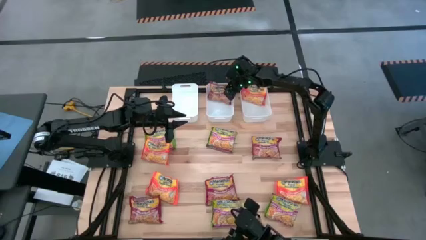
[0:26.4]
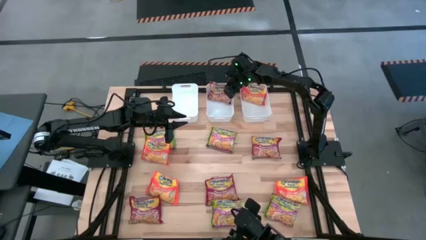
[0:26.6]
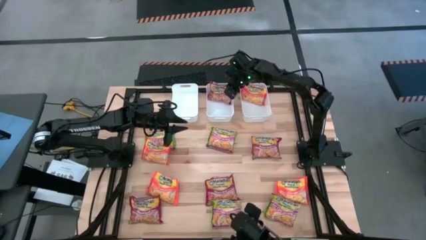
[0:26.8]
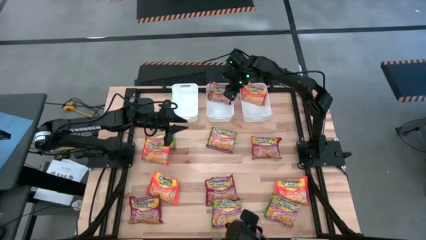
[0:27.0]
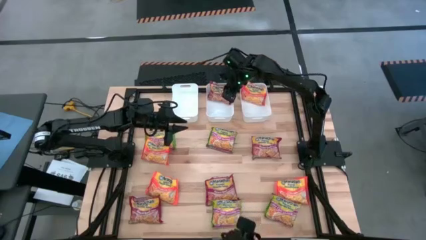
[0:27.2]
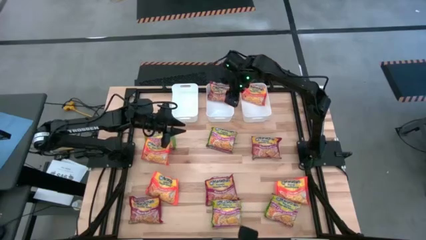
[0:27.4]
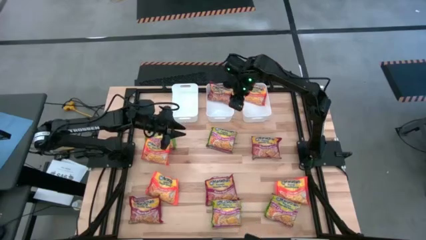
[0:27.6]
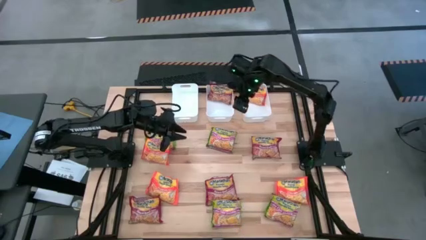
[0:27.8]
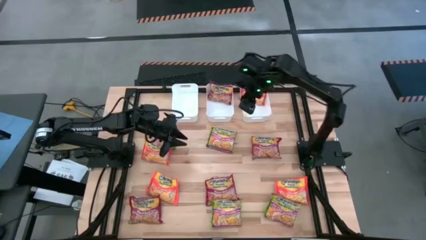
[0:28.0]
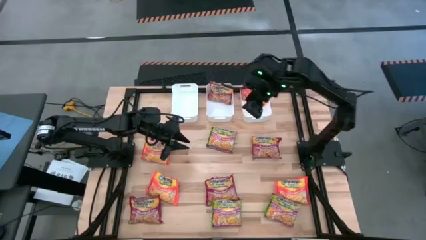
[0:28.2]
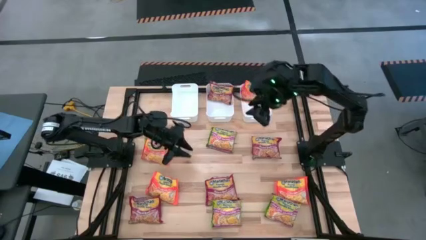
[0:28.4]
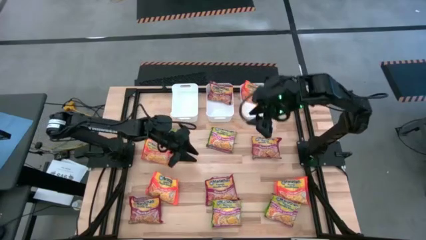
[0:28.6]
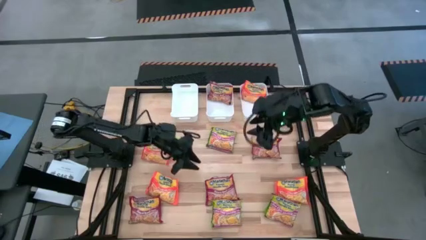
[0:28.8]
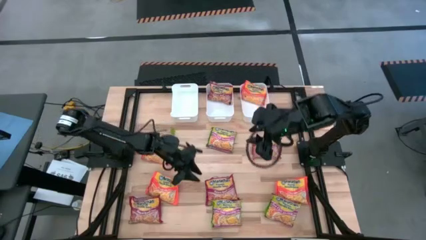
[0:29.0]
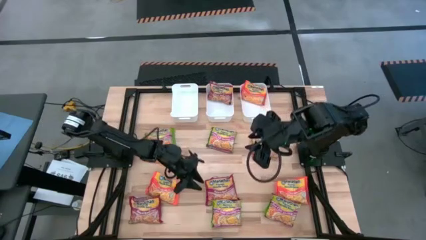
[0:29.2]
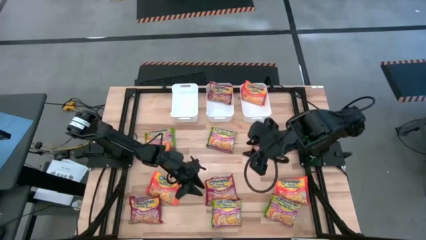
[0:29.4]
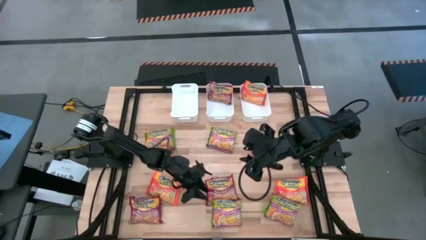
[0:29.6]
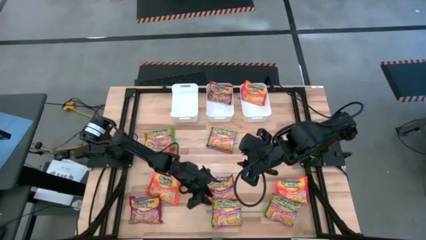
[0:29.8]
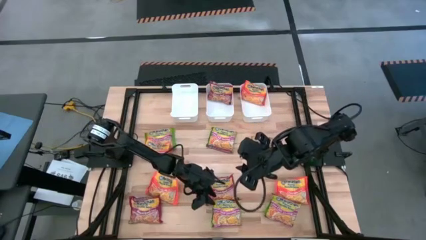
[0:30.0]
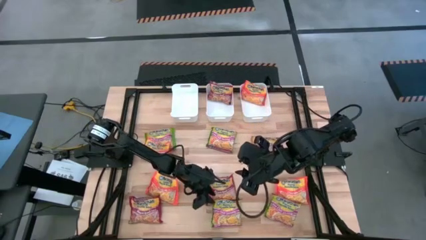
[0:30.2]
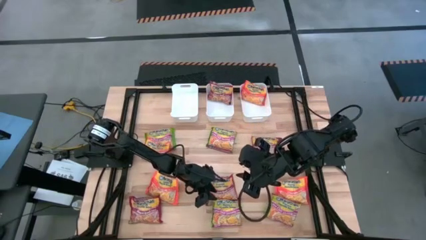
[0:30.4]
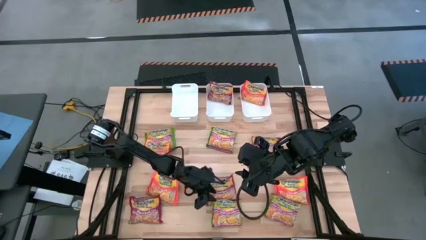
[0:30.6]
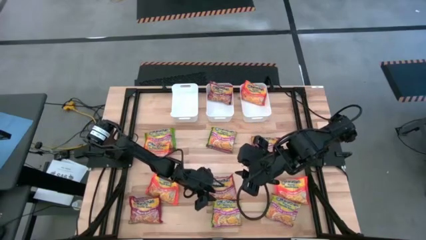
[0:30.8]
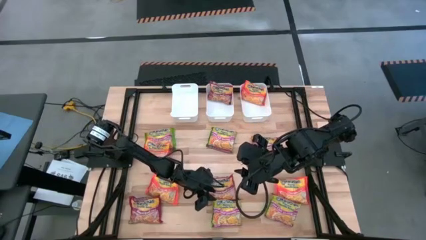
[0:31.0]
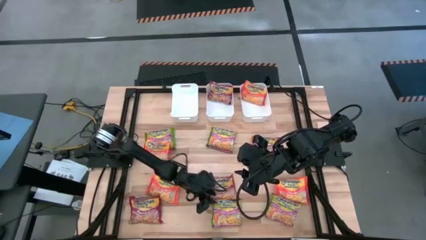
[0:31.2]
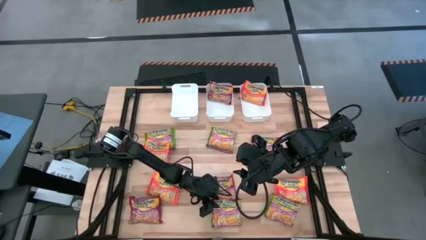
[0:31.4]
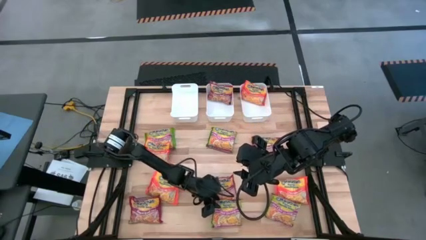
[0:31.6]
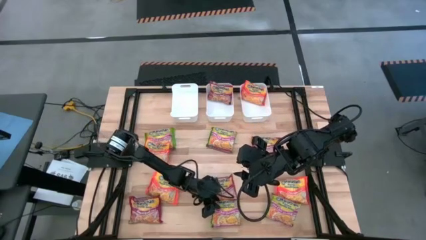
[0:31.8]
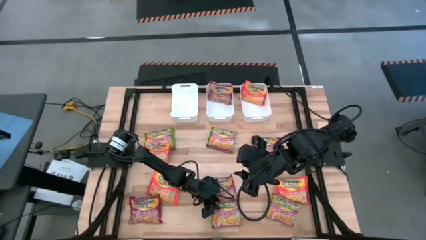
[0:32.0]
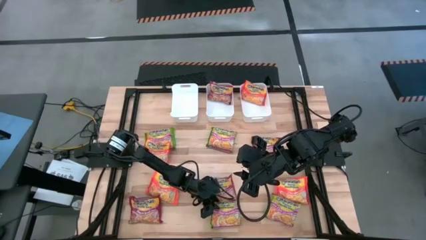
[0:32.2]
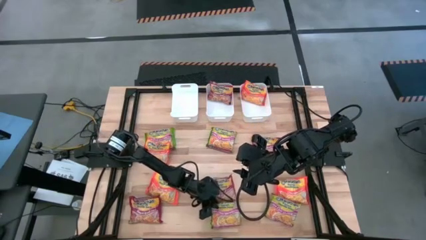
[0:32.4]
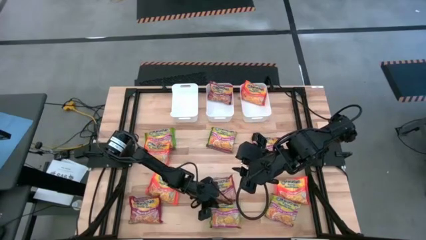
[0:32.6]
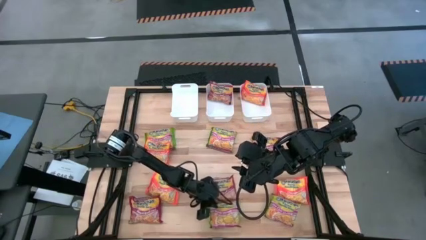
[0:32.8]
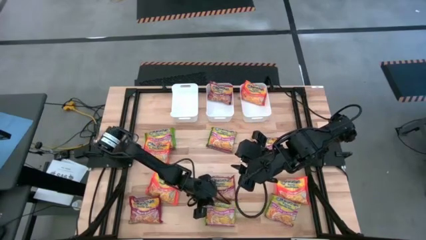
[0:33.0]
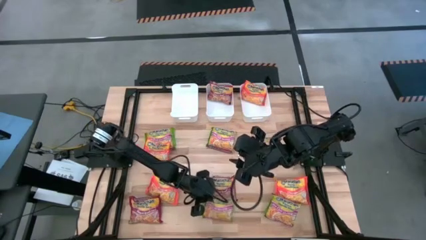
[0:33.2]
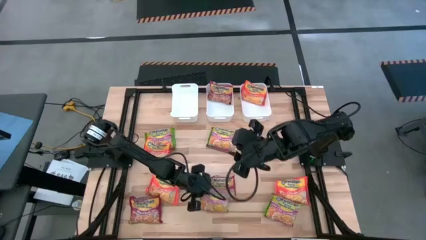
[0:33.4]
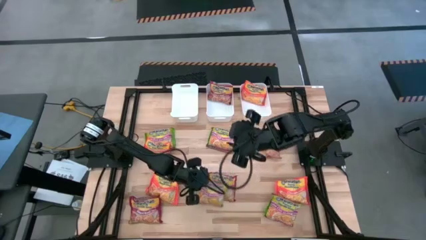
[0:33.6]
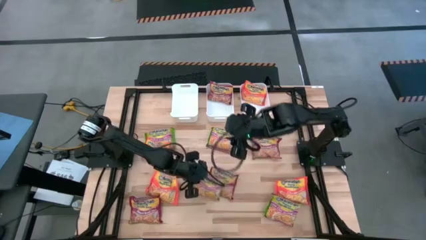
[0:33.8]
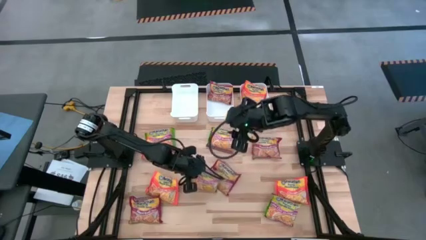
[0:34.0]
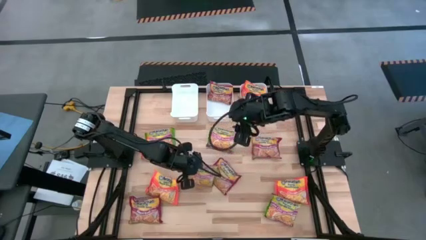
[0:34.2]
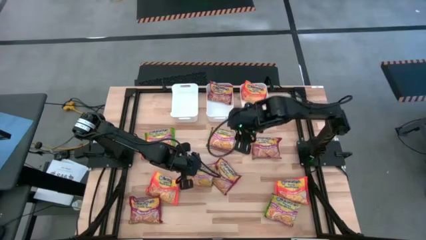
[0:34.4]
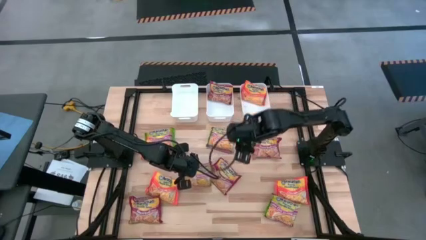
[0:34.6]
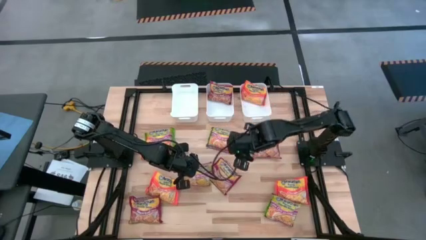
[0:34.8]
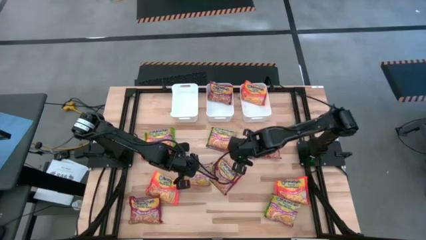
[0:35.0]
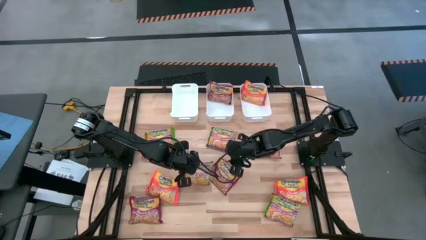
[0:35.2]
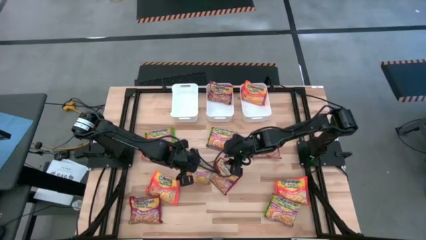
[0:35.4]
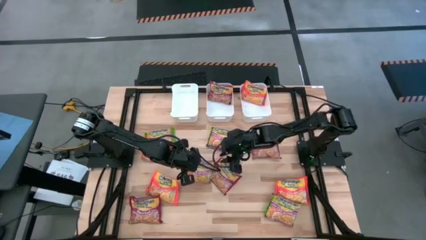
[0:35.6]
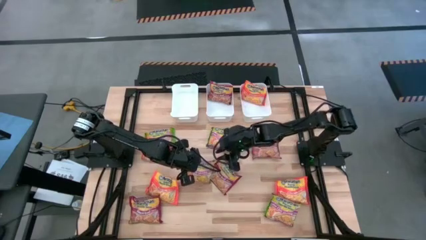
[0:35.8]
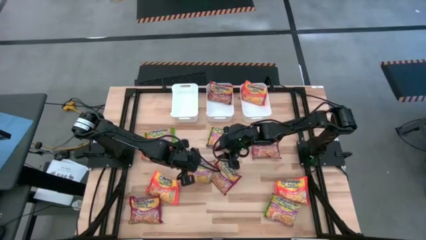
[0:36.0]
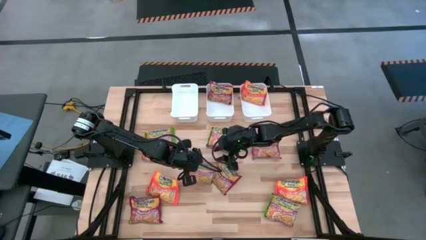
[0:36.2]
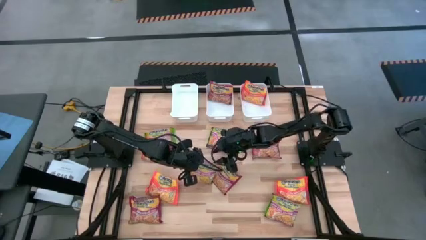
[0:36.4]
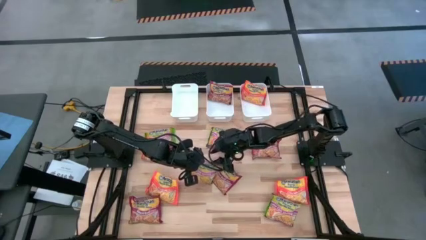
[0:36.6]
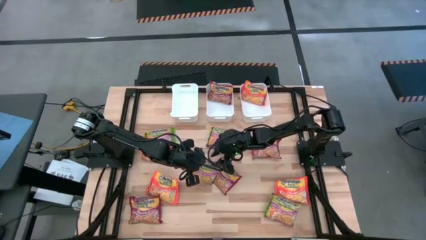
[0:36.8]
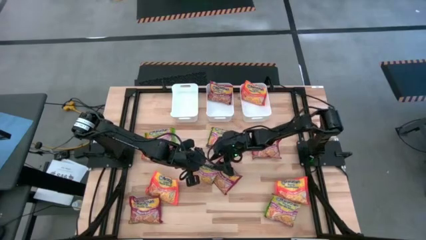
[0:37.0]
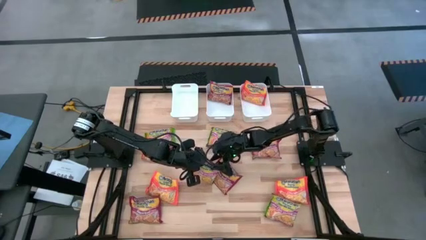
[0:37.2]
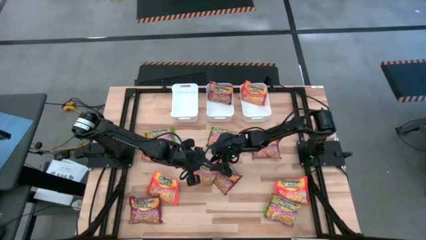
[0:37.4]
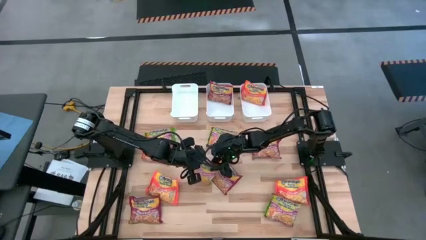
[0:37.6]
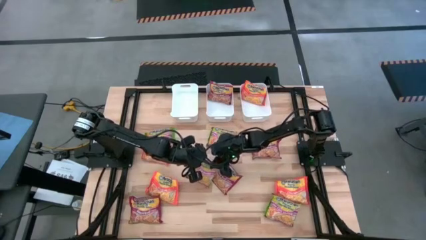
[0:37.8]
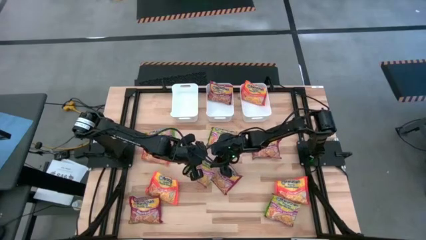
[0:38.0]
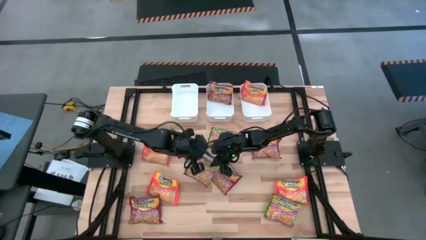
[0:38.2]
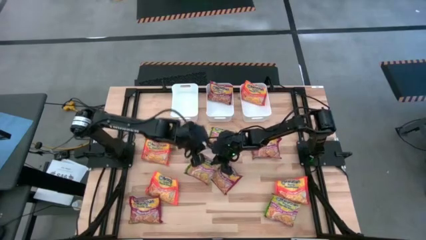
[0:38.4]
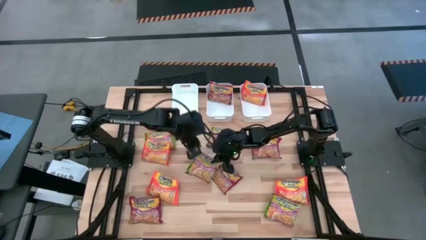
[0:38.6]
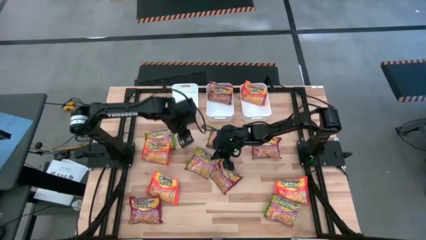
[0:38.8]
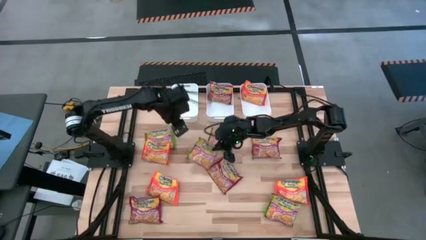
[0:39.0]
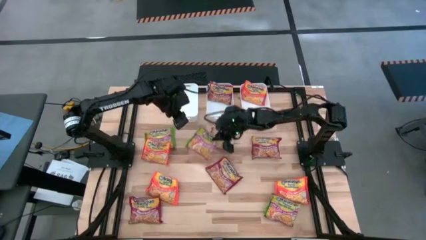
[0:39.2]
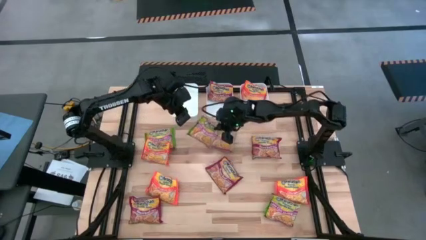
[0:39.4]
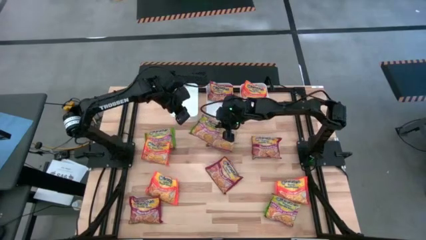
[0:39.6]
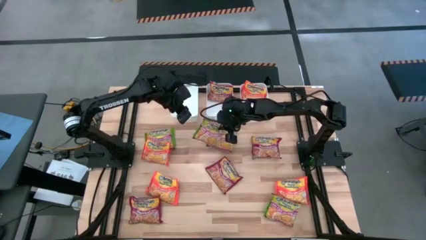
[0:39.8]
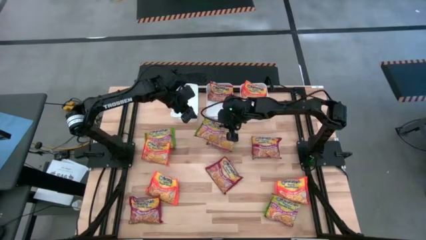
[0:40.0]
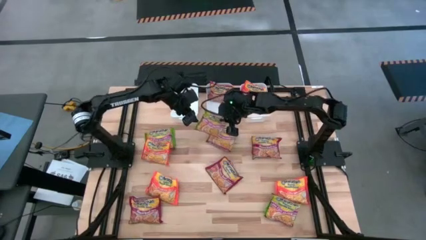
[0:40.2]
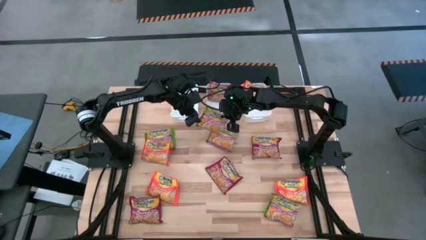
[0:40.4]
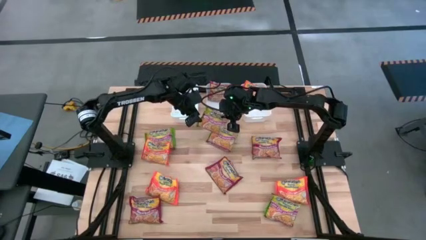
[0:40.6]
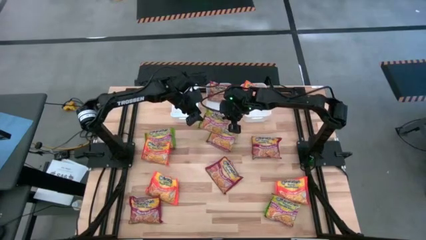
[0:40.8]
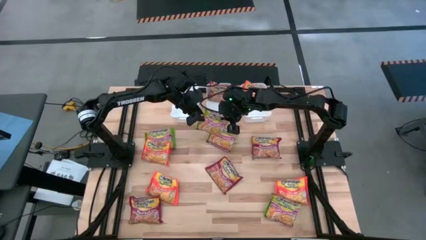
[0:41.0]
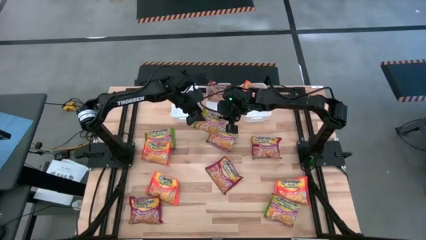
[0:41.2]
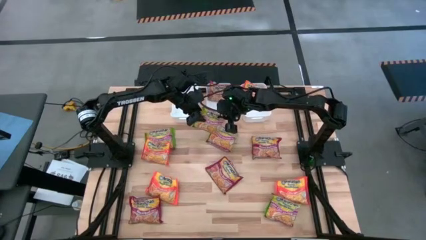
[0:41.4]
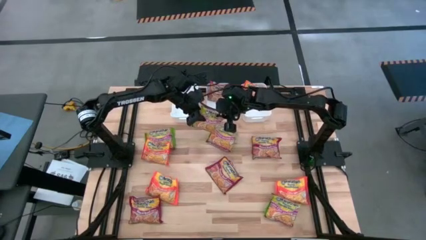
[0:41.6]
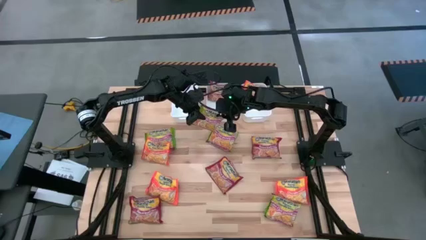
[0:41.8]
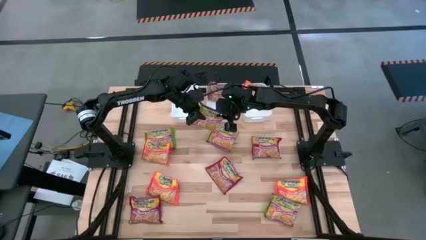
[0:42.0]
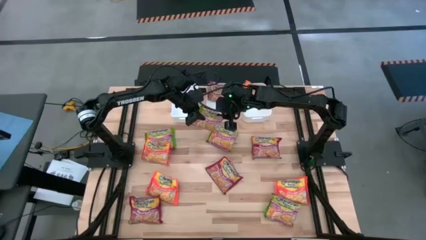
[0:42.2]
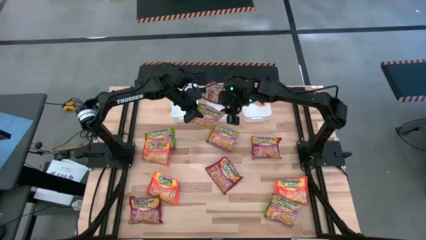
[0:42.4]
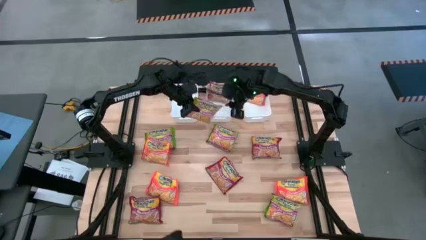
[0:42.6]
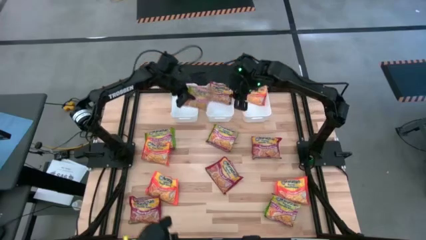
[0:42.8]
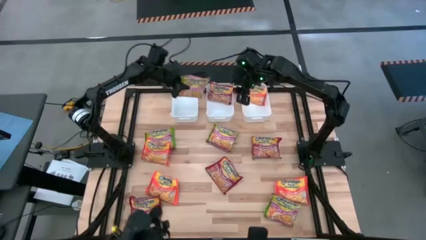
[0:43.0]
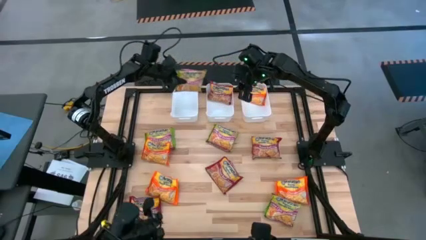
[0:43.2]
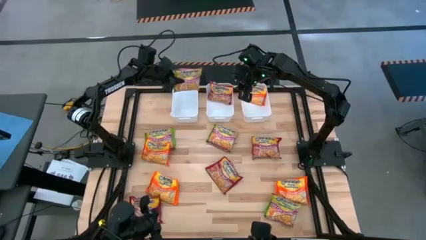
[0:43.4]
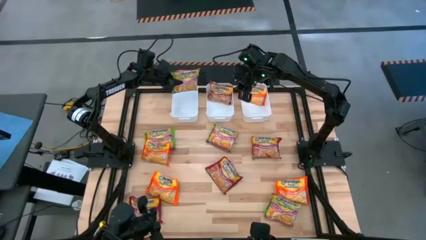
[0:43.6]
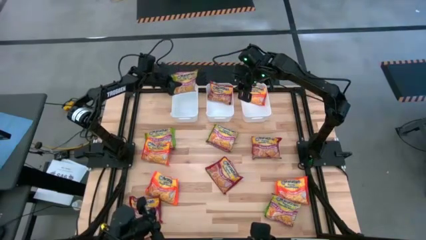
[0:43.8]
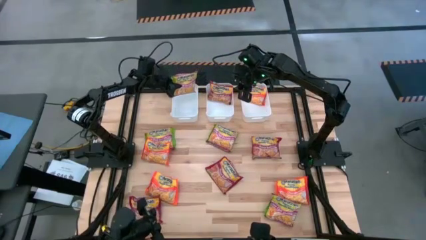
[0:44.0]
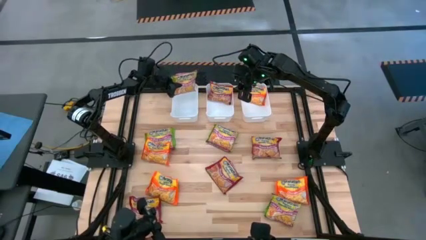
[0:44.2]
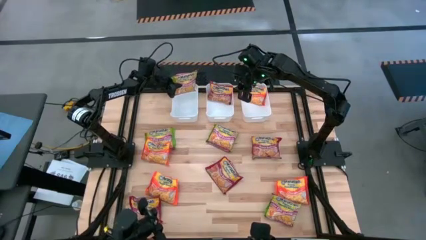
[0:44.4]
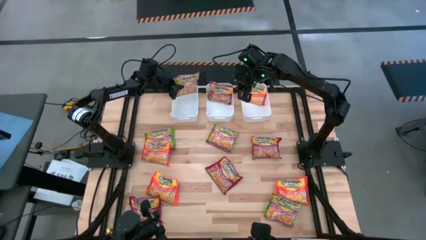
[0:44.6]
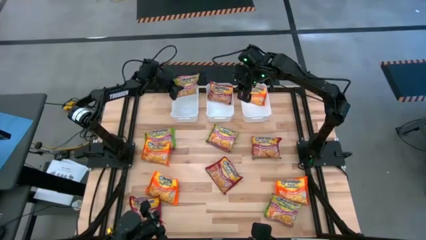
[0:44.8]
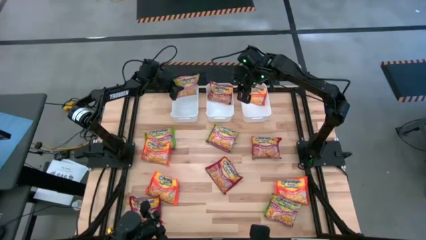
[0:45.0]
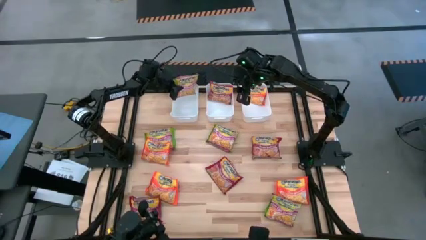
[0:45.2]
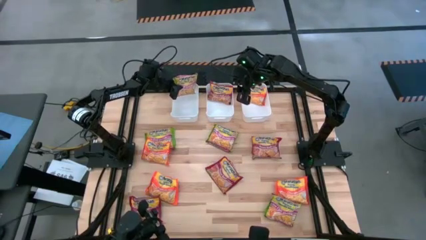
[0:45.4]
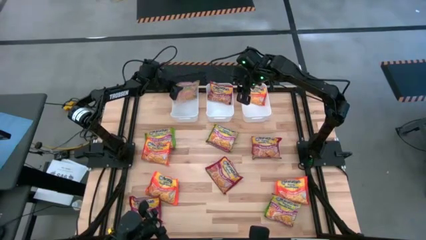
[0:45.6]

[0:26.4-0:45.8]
Task: Sort Maruchan noodles
Put the green noodle pack into the left white bin
